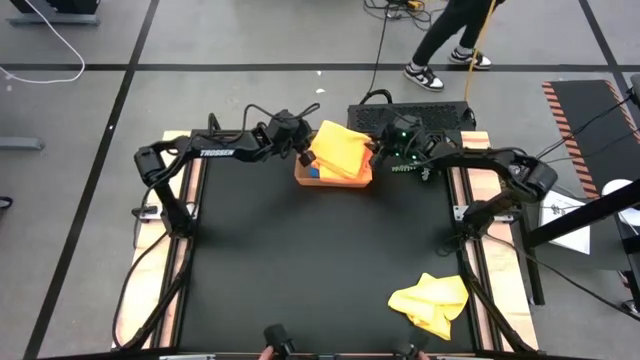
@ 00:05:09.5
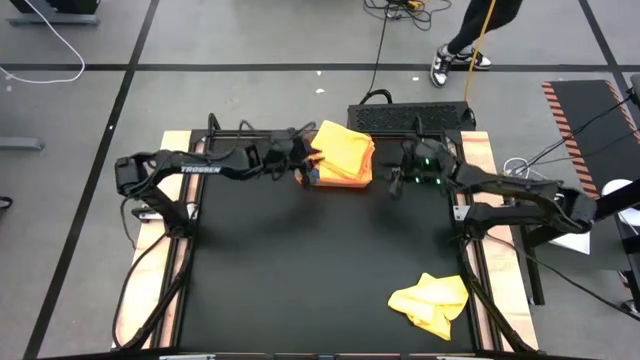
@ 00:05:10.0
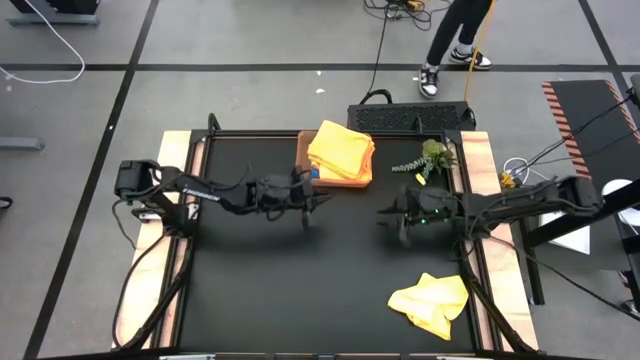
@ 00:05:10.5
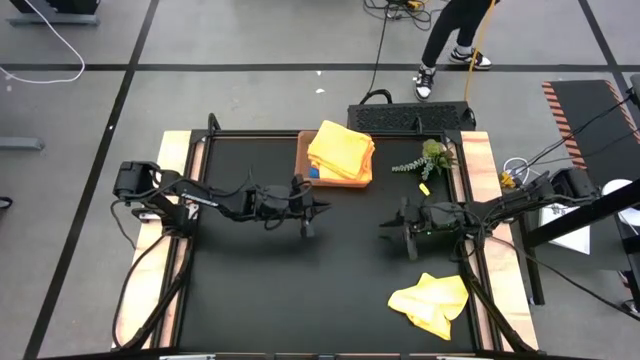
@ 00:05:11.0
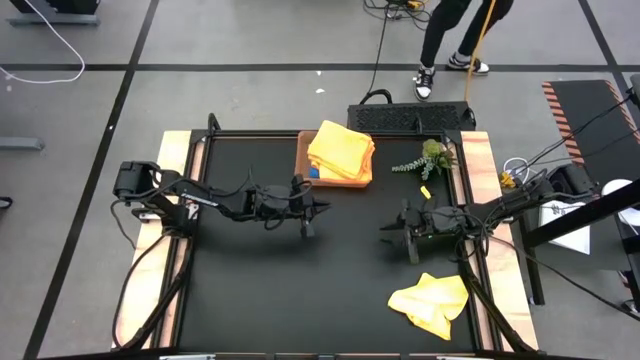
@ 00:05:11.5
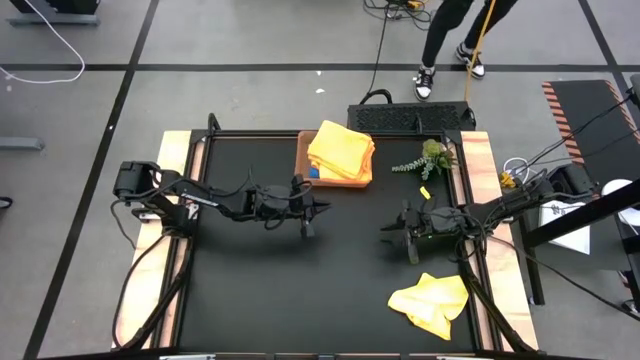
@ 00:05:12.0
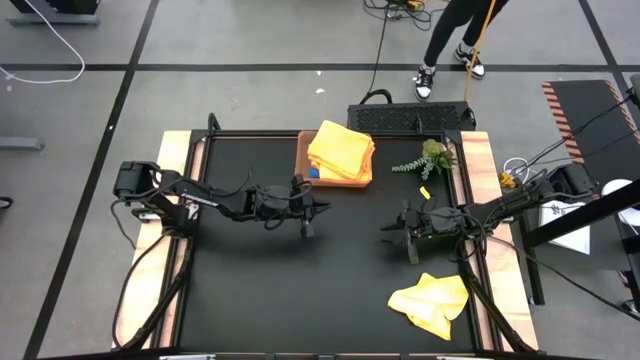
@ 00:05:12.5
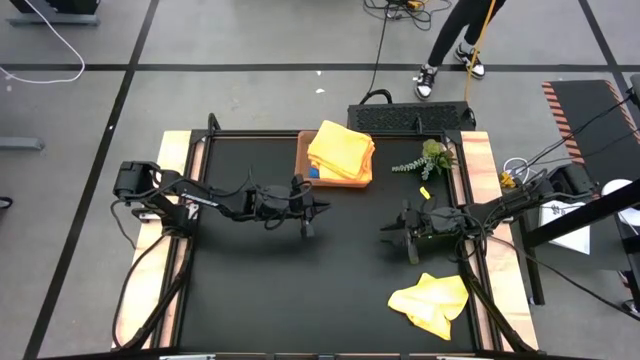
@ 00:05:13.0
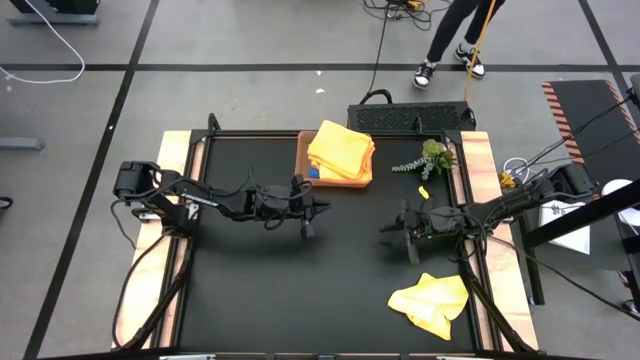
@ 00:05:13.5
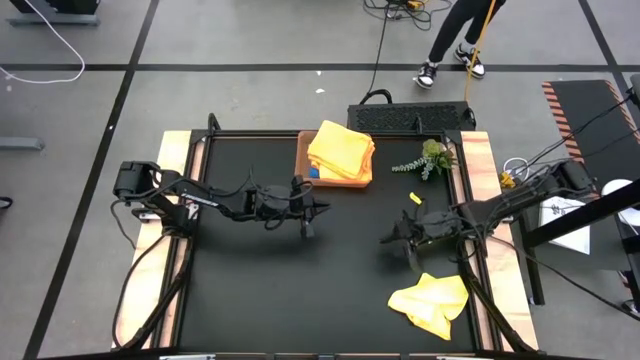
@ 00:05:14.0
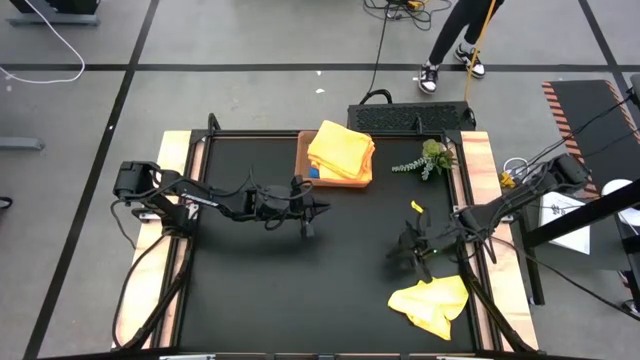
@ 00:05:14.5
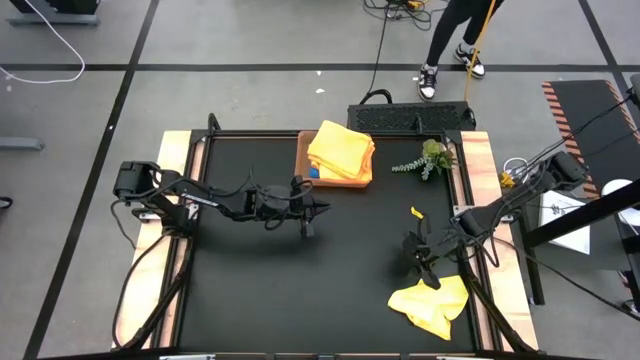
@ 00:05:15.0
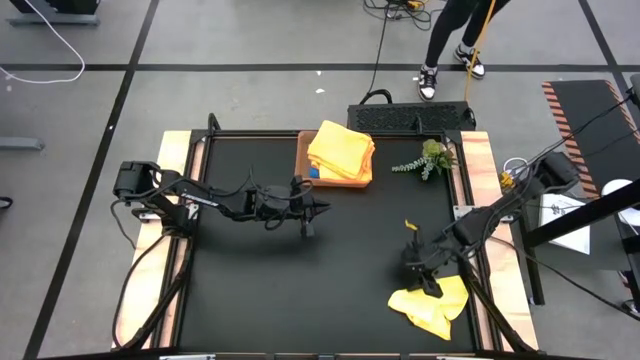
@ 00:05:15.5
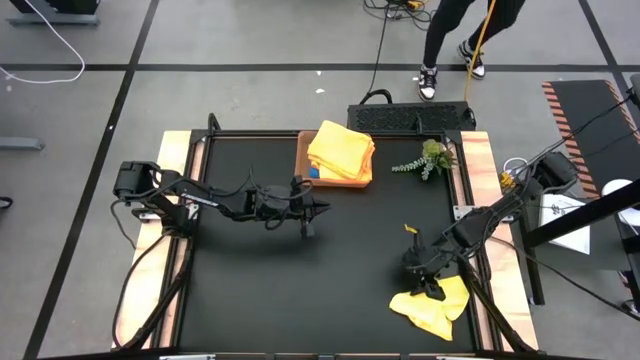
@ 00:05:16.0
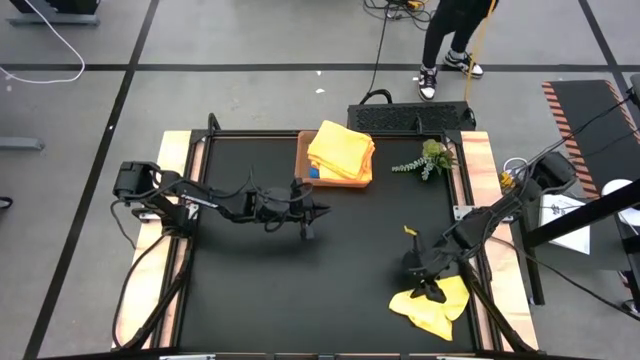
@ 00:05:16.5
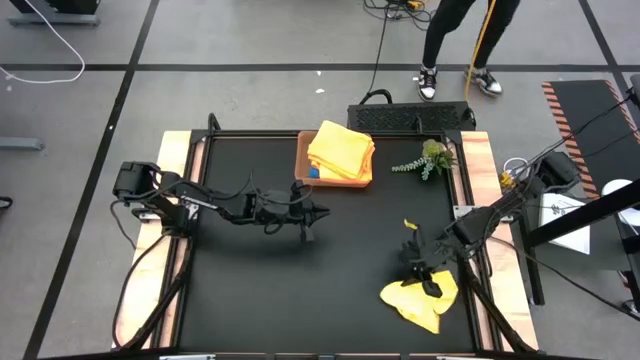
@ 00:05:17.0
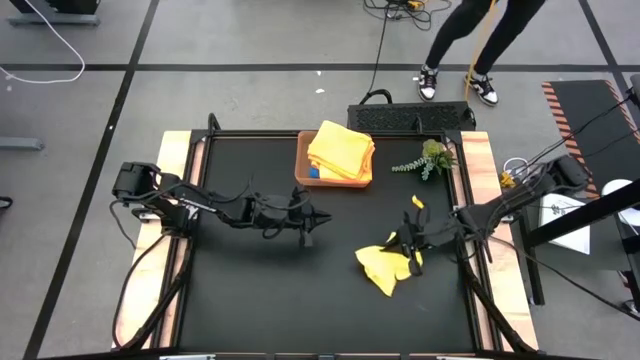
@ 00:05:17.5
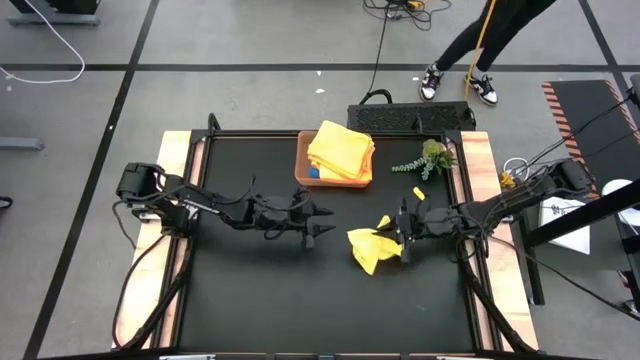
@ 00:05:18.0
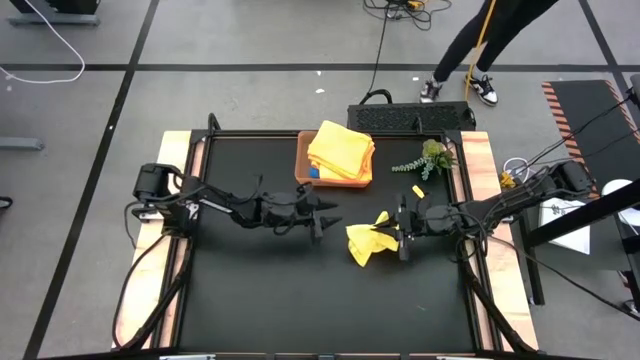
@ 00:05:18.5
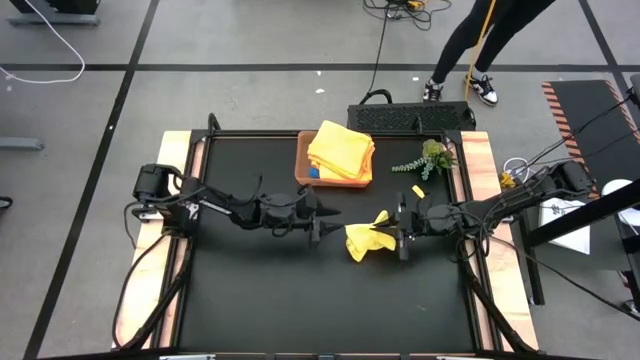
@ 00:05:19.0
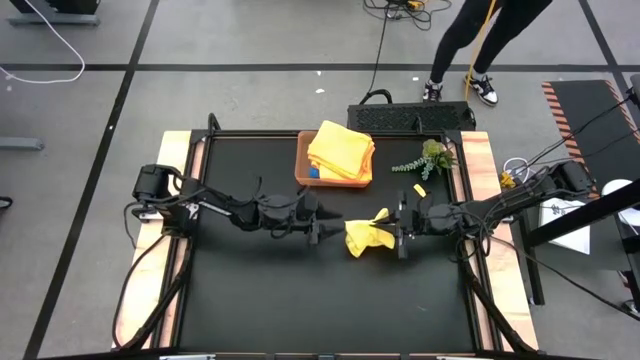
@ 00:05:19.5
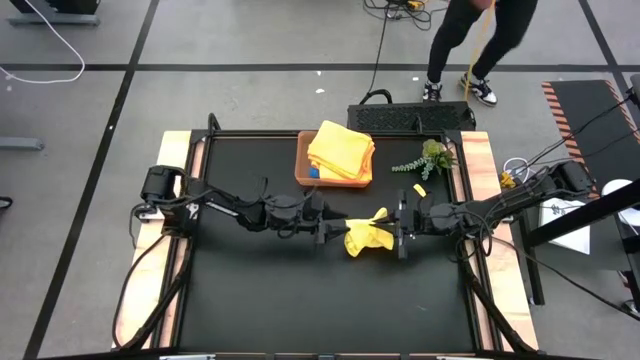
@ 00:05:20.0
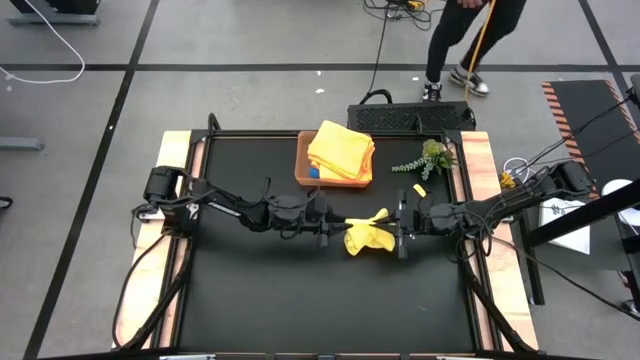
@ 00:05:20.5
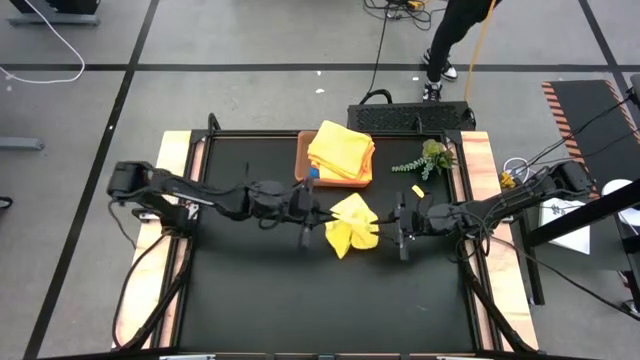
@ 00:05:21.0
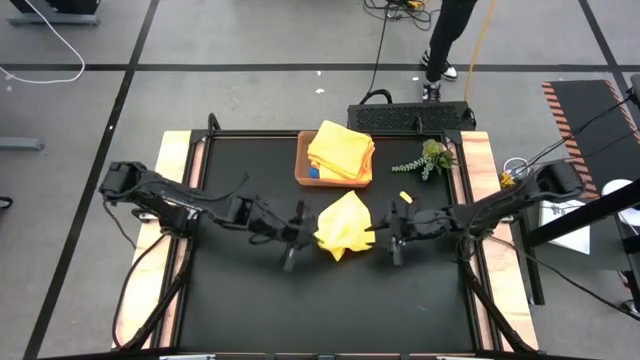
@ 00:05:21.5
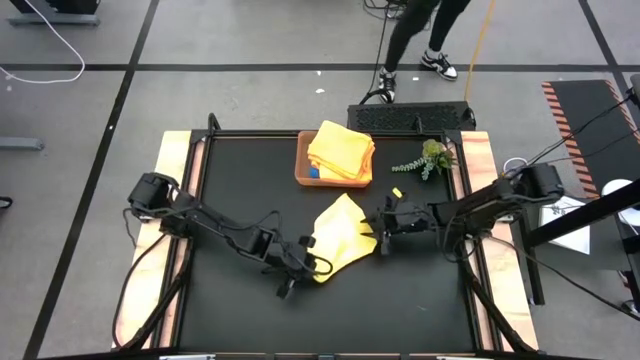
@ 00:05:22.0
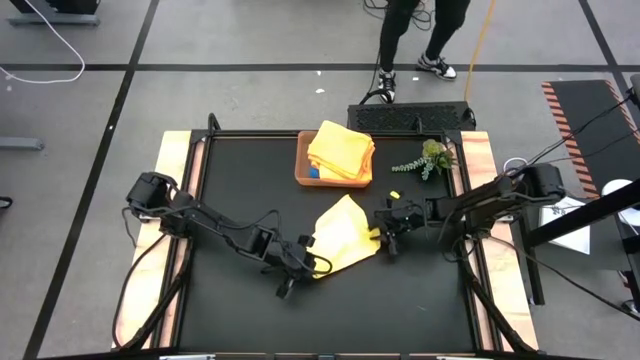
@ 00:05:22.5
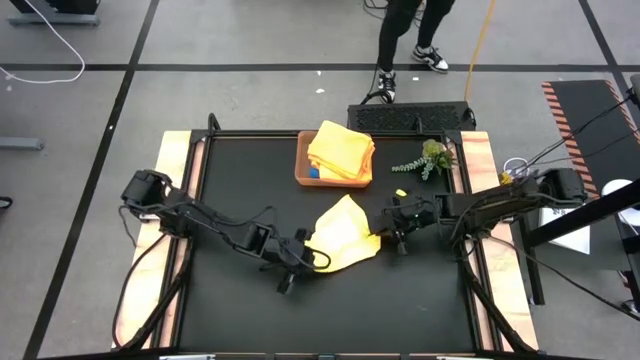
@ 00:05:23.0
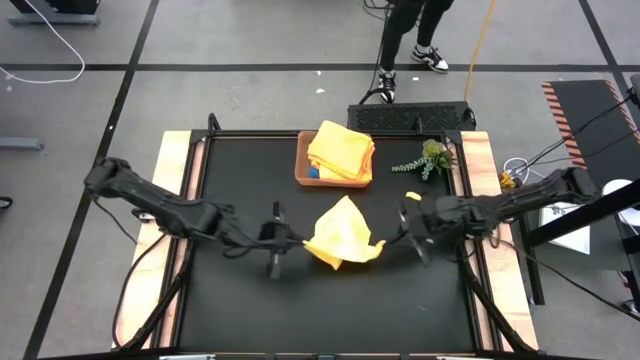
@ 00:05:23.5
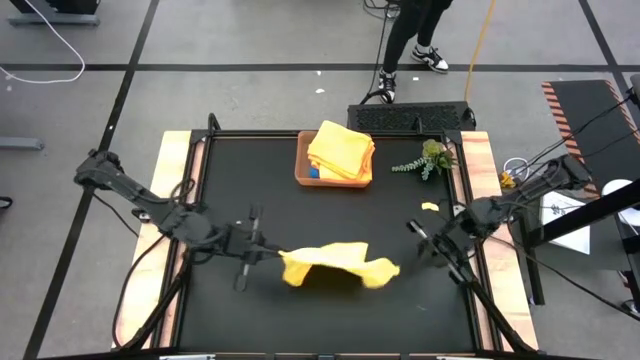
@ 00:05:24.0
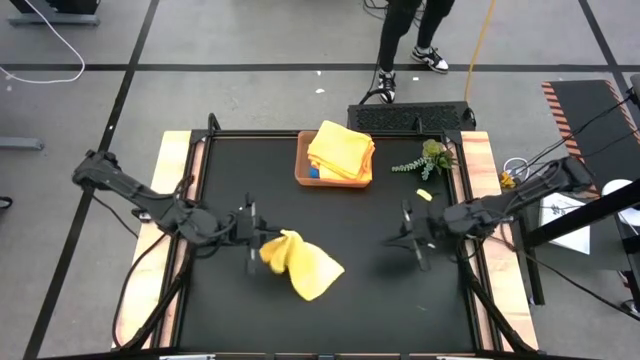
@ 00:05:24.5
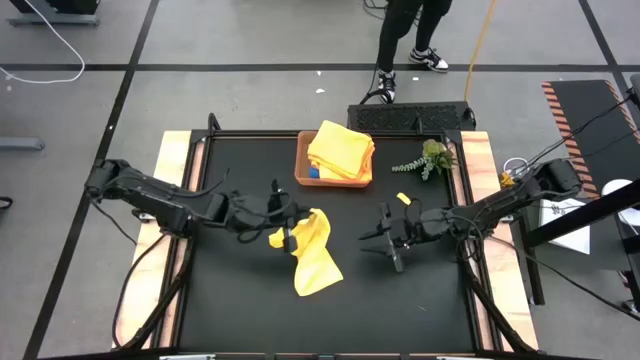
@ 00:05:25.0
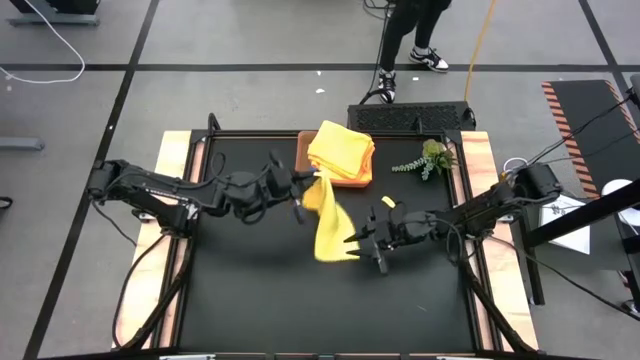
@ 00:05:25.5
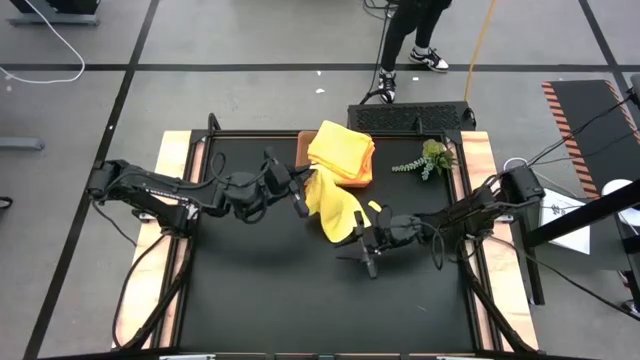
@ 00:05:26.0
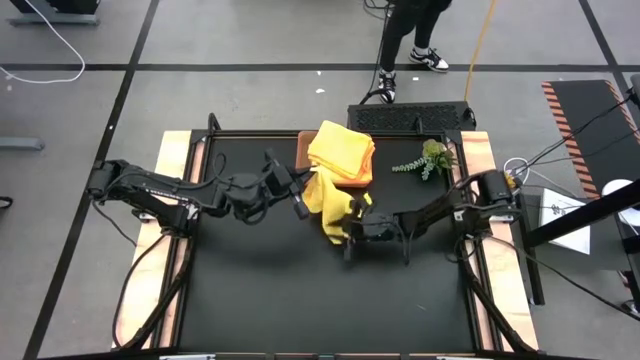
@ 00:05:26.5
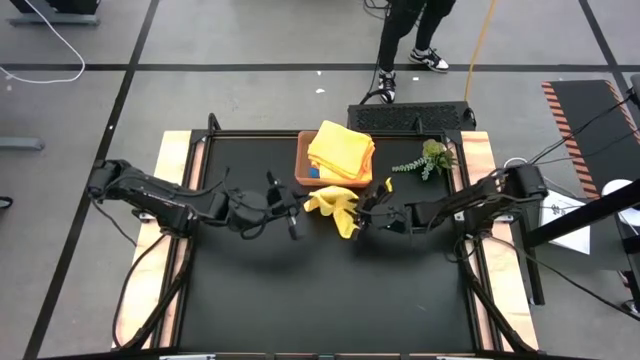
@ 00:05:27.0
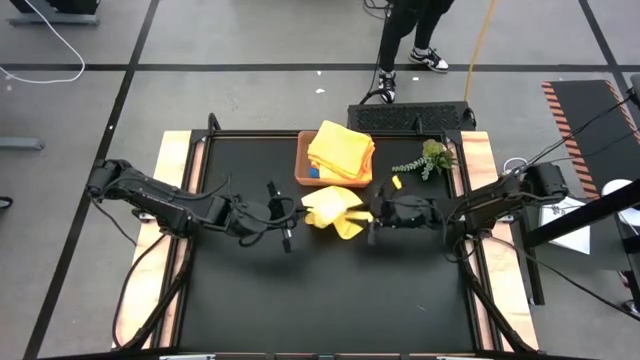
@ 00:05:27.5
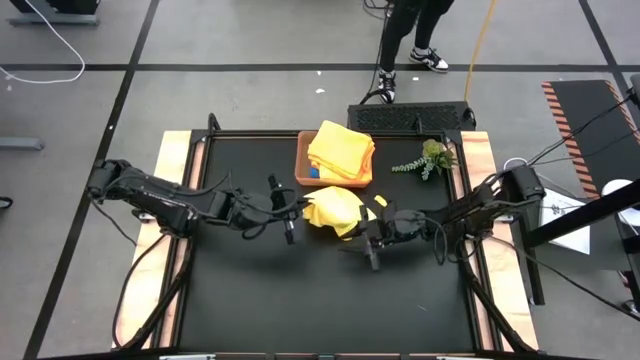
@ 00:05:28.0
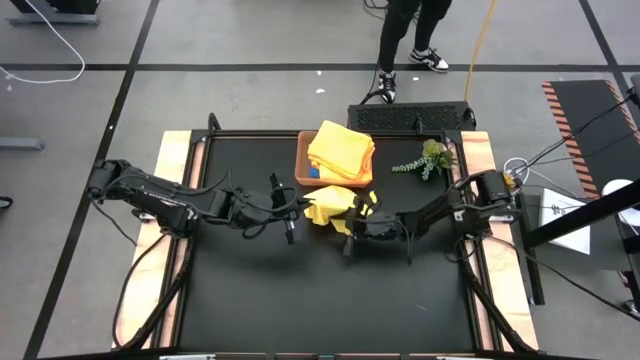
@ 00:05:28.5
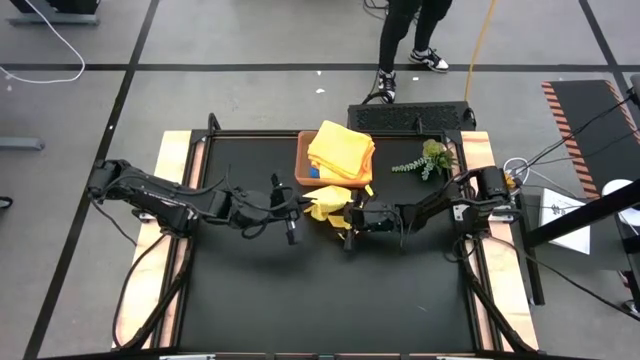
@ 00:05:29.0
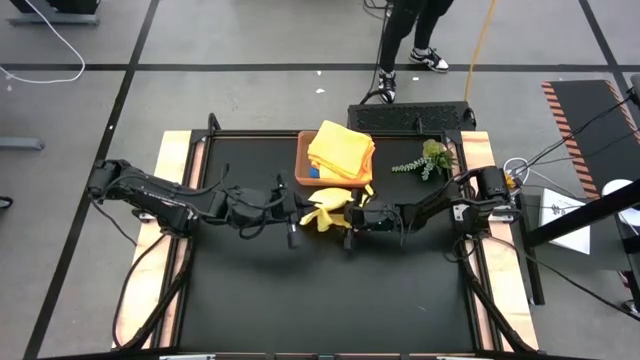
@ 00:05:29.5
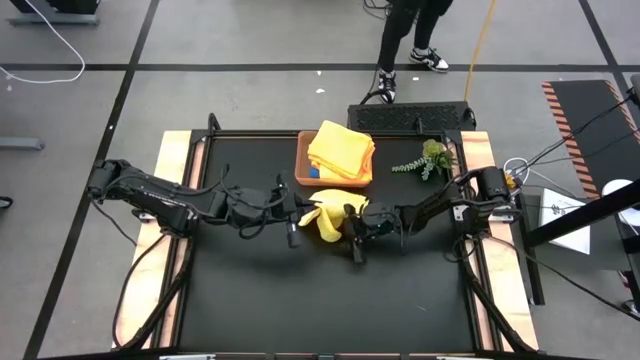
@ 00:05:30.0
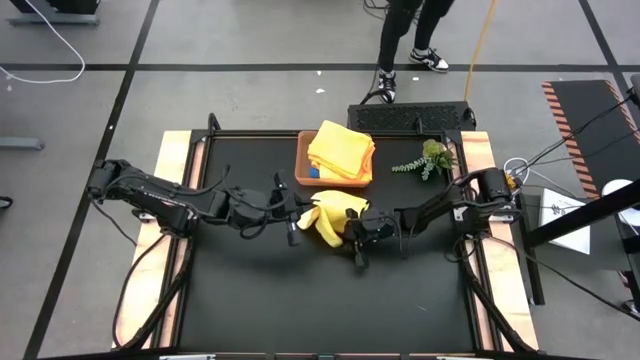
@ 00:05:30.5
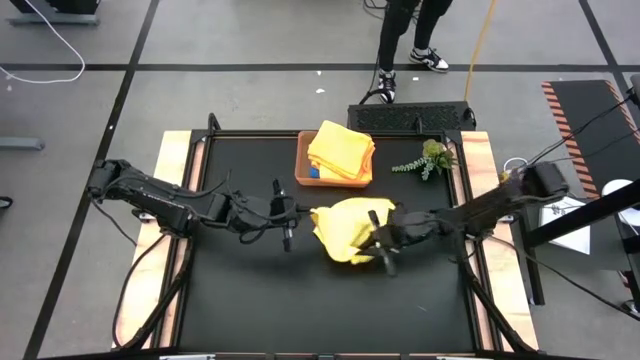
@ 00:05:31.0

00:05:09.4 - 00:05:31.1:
Task: Fold microfiber towels
Fold the yellow microfiber towel
